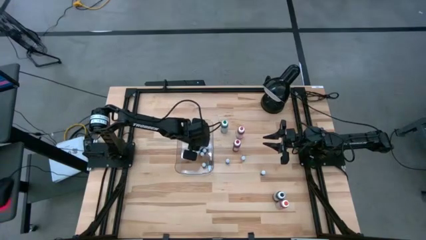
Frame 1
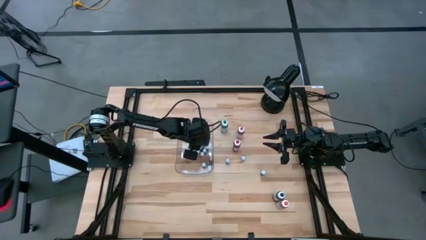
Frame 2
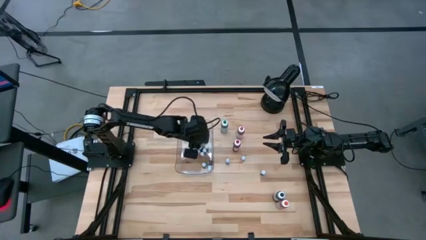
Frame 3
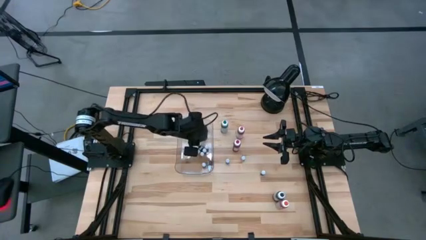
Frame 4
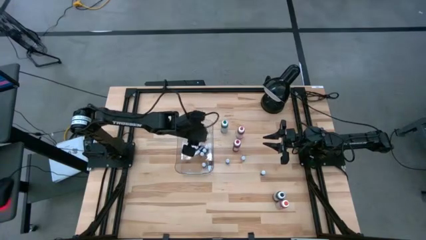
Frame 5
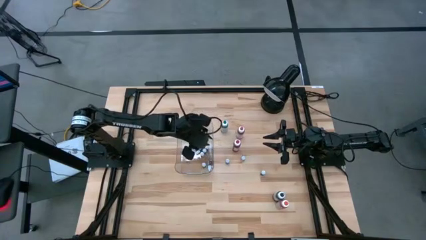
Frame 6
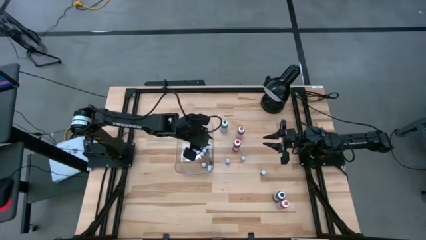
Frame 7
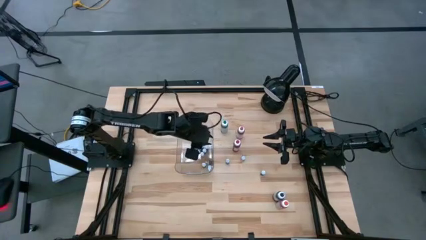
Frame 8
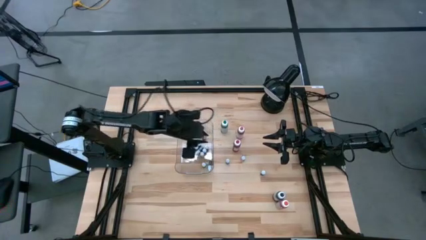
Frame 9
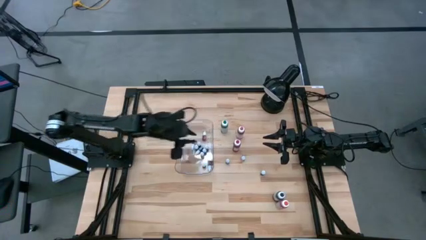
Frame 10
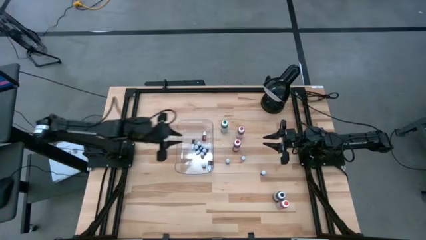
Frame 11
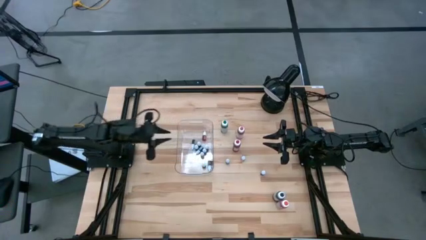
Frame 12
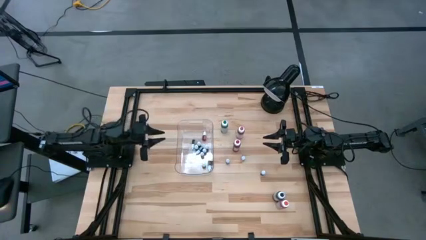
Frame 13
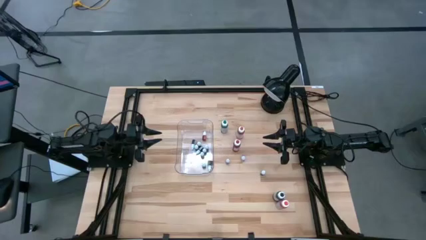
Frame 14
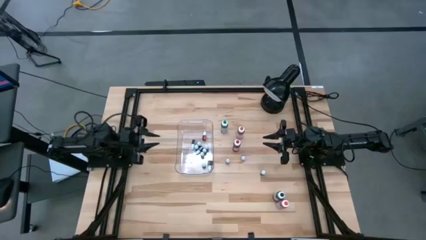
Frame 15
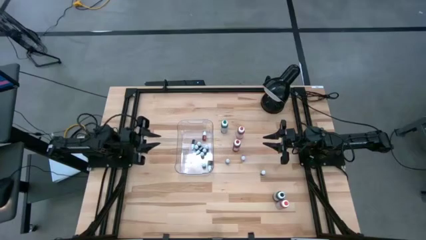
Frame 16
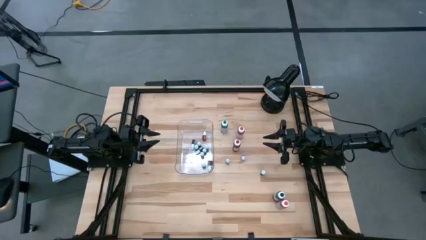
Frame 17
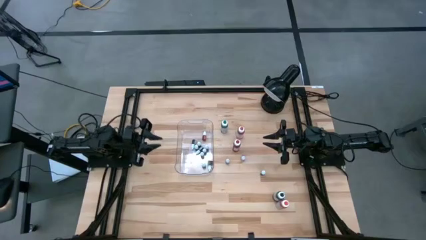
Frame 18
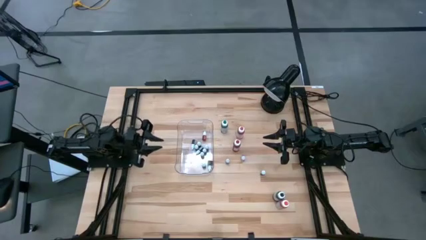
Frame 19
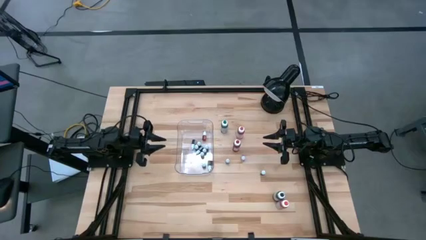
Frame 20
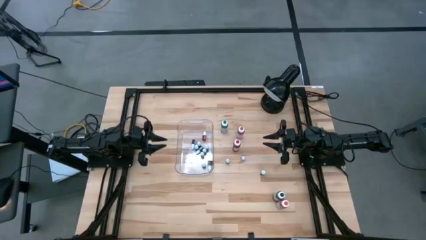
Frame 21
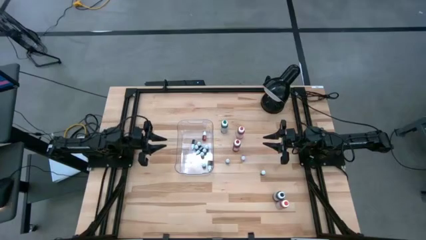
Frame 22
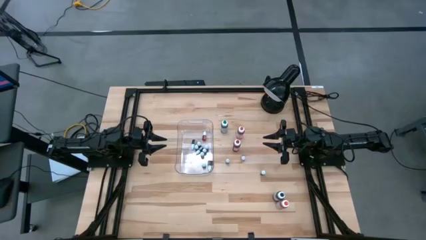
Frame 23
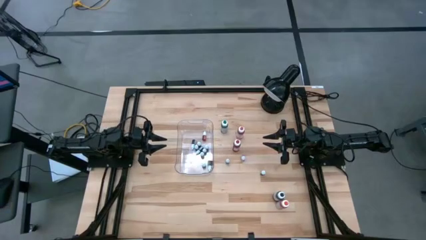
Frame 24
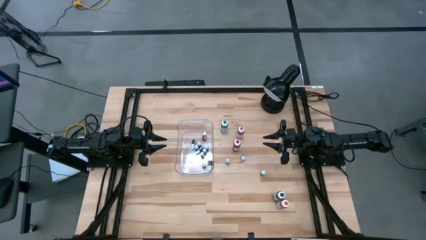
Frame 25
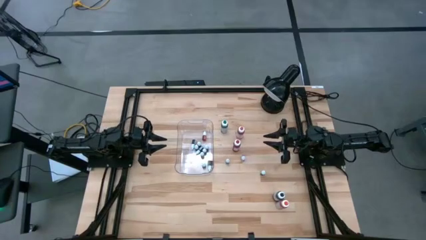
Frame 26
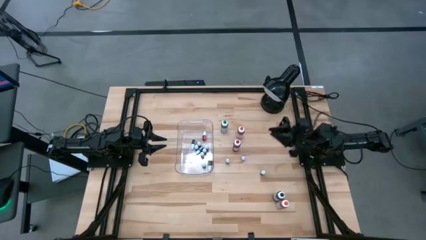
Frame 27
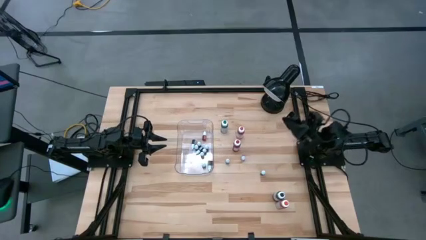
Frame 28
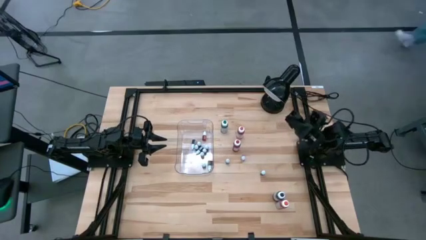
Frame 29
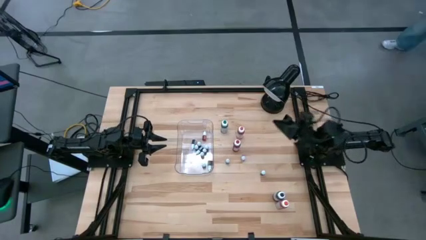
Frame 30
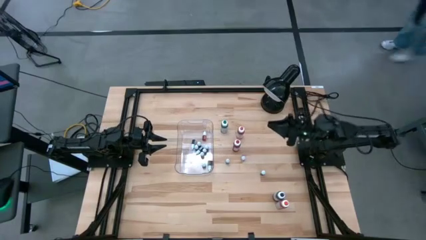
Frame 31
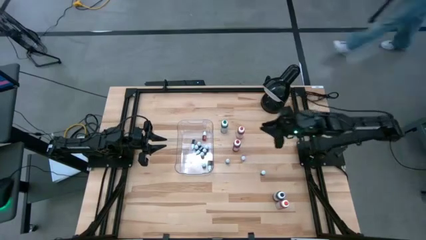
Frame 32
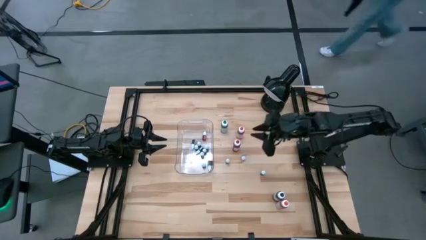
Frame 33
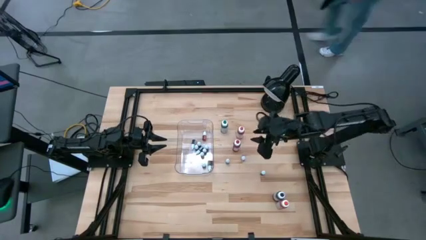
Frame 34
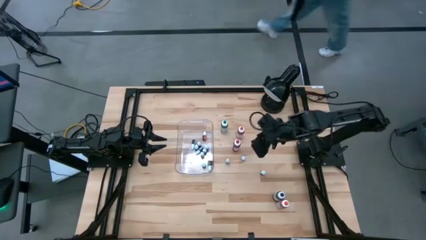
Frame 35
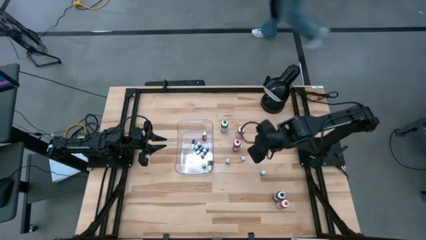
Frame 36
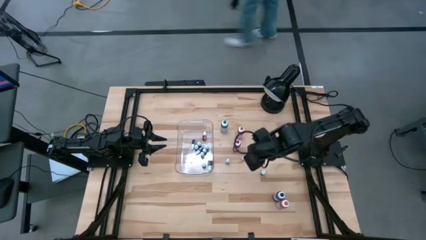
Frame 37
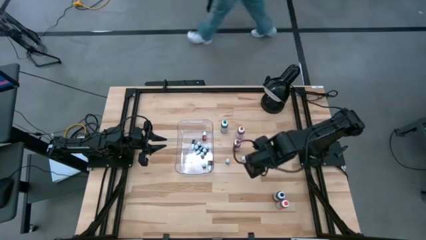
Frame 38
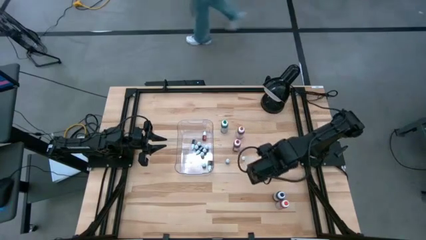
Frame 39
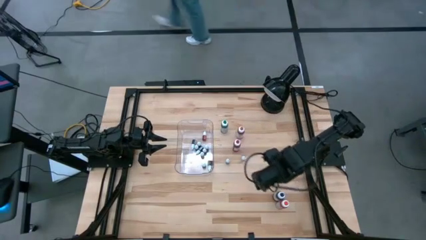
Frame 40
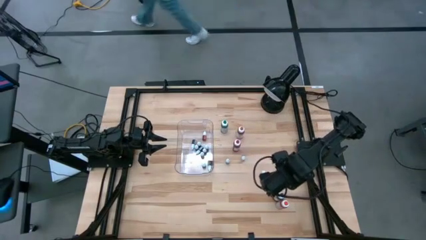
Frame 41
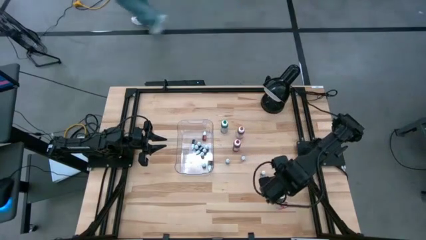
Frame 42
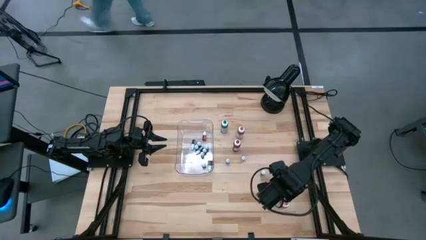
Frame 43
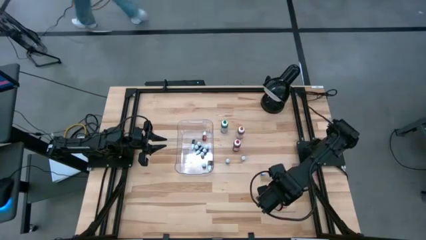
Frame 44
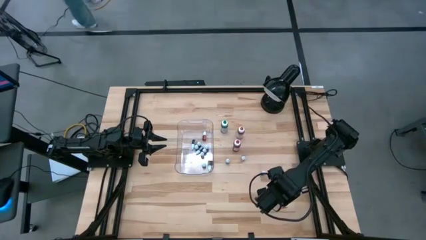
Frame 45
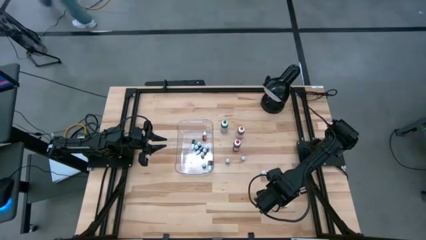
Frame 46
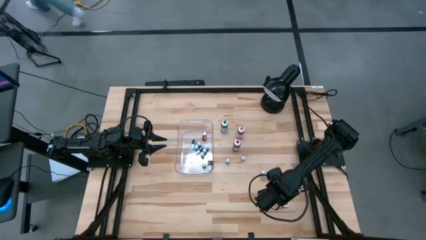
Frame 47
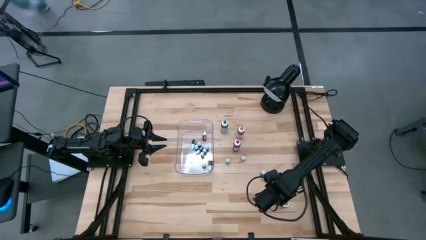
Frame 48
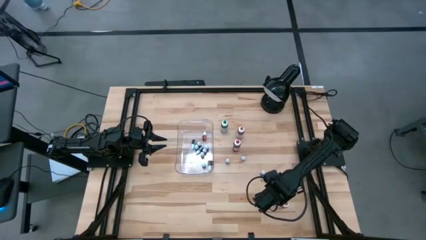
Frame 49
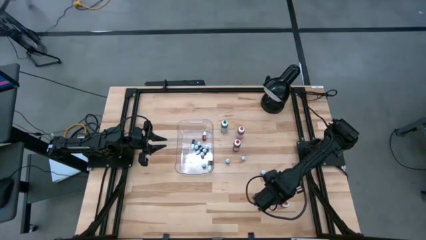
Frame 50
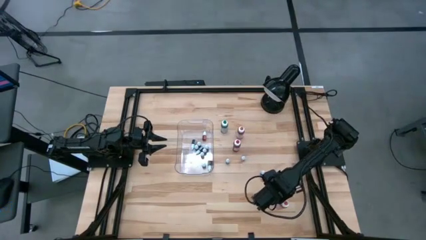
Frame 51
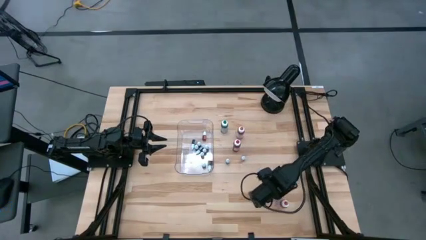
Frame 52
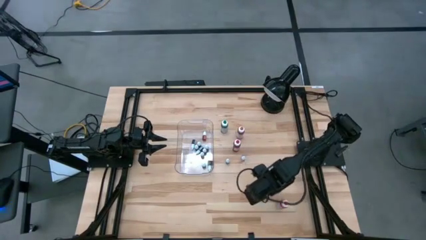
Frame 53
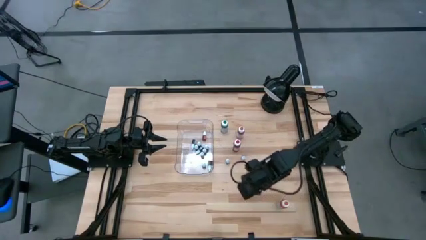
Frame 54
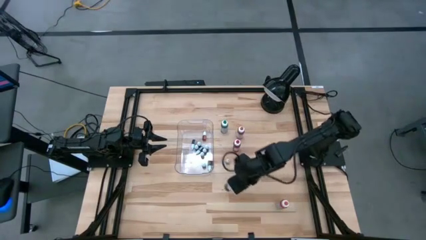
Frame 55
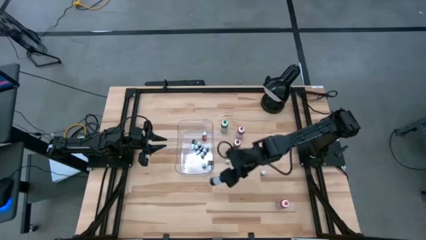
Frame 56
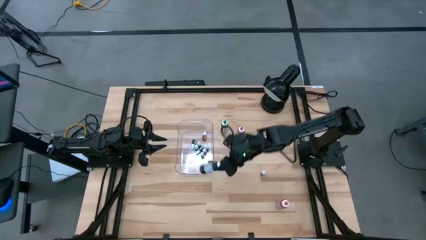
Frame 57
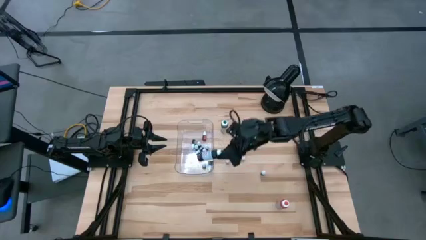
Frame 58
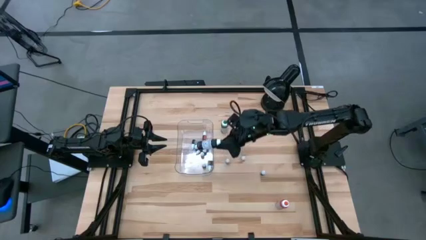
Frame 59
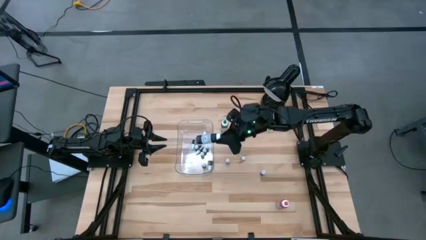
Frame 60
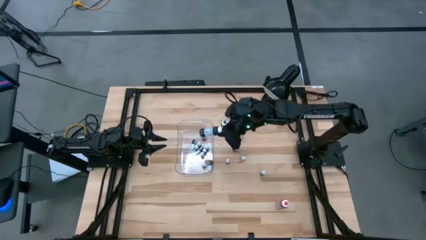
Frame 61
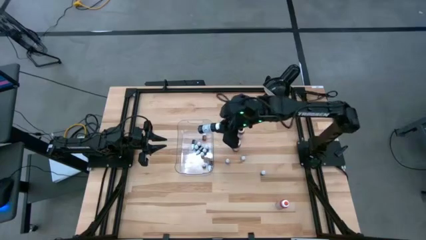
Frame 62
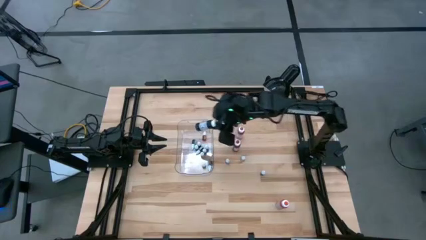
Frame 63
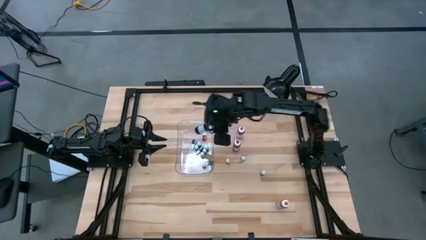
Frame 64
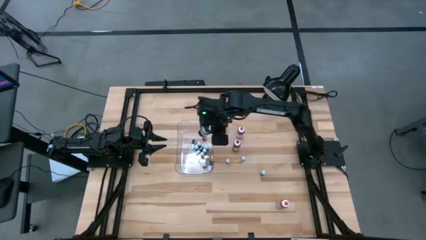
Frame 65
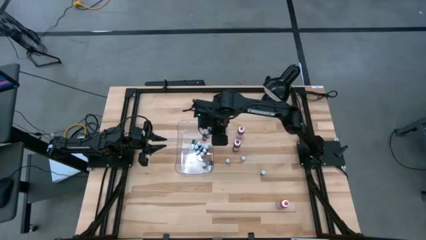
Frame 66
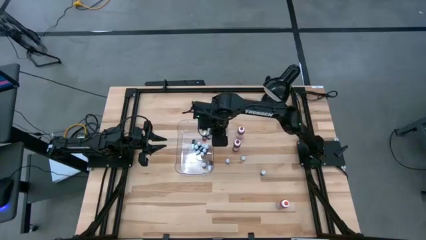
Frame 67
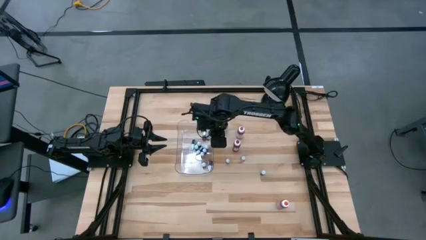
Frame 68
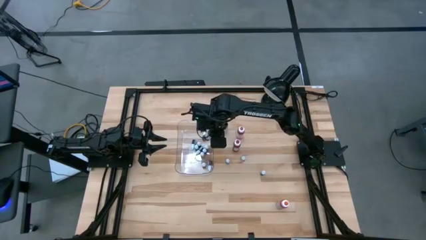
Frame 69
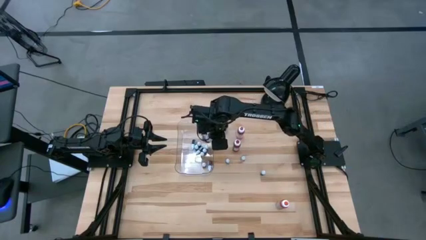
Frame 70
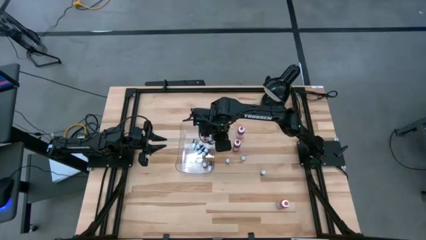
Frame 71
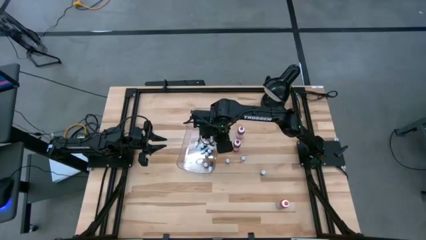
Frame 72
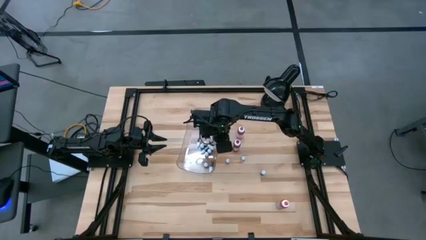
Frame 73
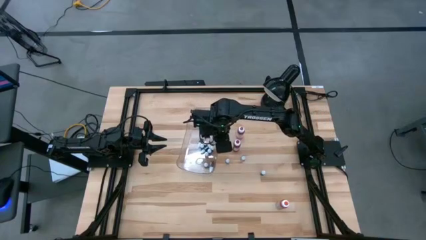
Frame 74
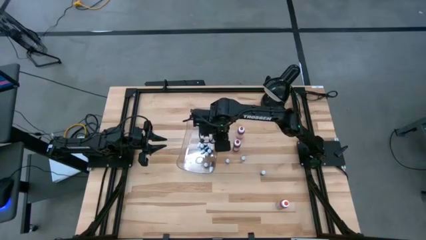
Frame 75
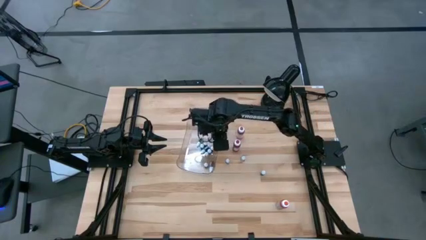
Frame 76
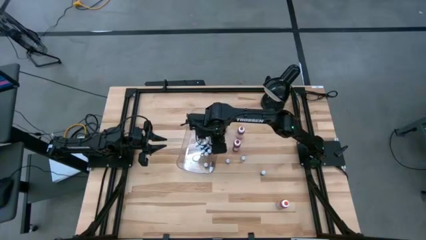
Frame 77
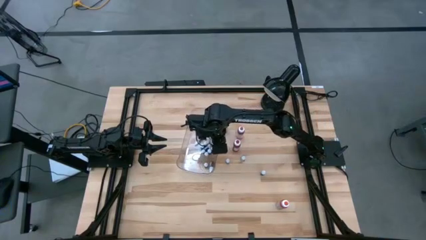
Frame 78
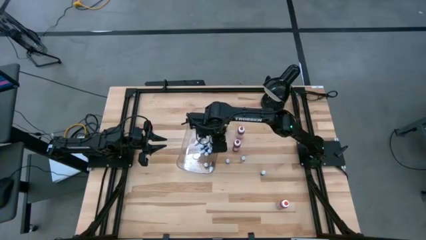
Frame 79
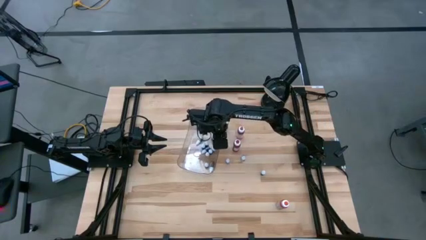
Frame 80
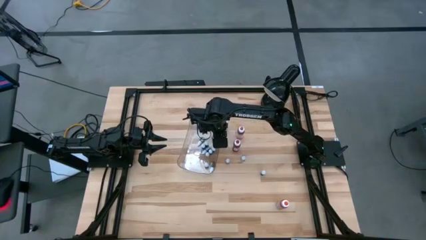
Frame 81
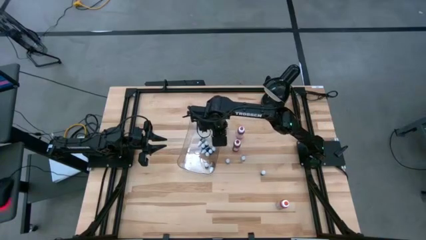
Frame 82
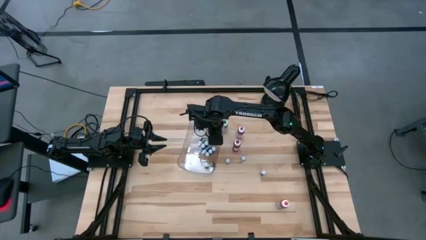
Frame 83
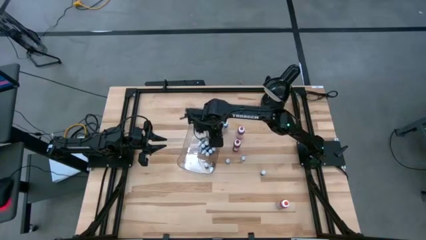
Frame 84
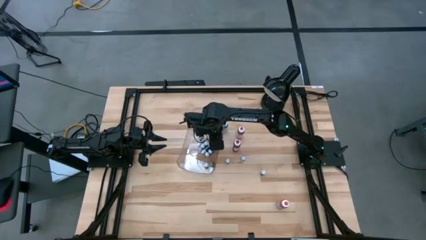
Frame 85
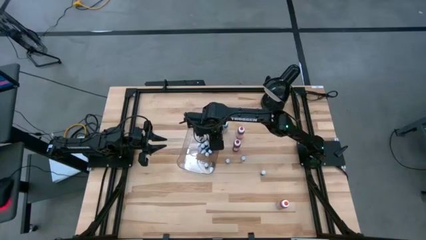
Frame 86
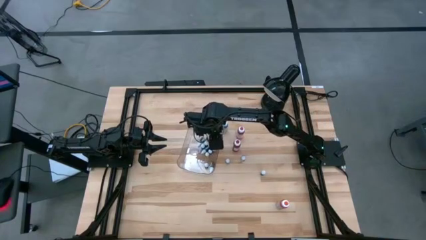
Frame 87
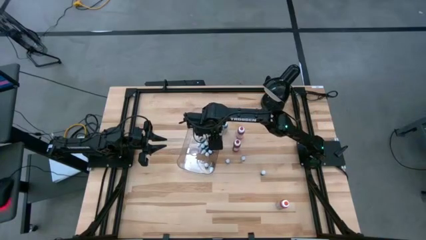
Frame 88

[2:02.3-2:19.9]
Task: Pick & Place food coloring
Put the large dark blue food coloring bottle into the transparent bin
